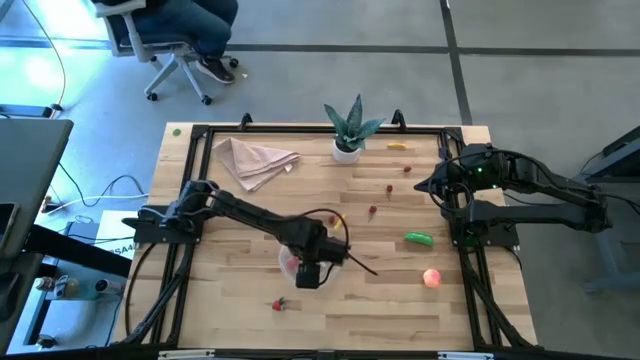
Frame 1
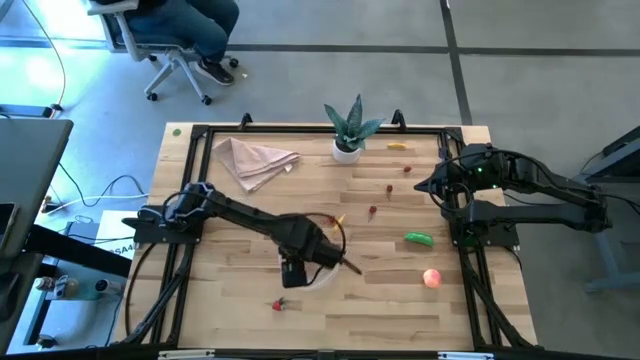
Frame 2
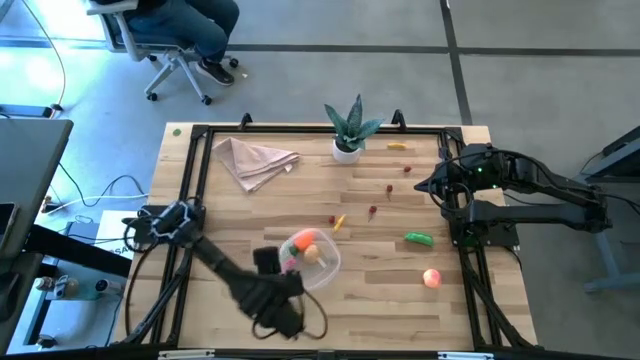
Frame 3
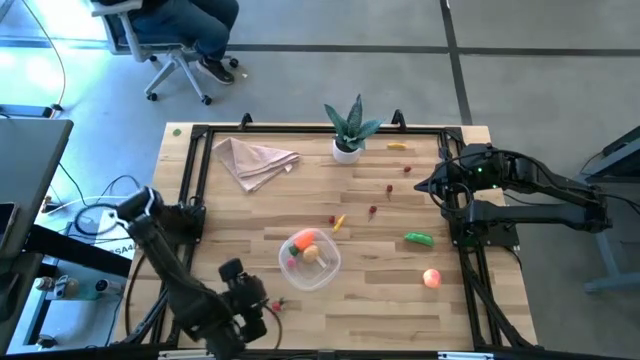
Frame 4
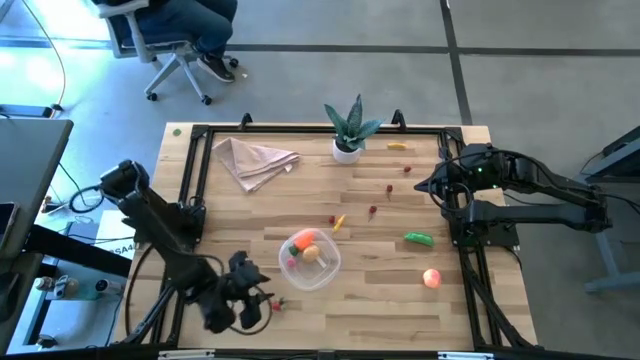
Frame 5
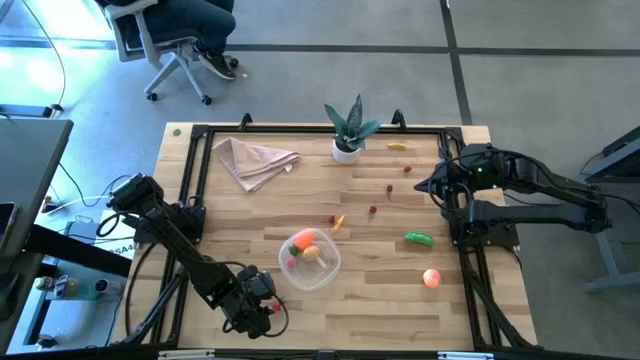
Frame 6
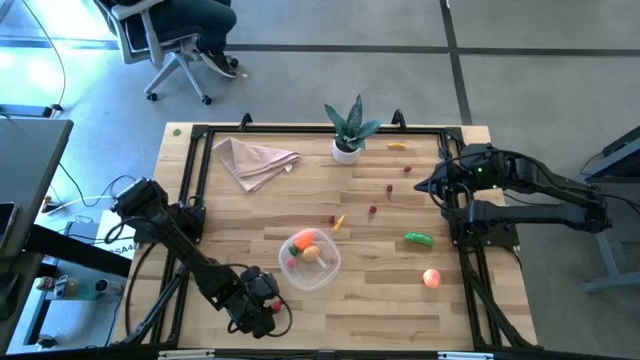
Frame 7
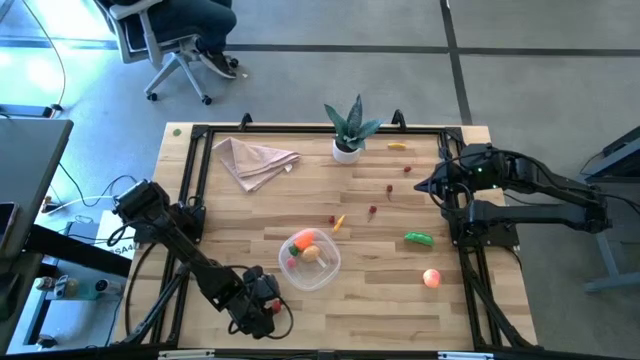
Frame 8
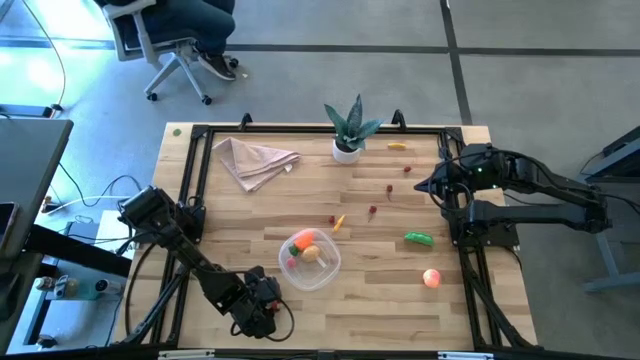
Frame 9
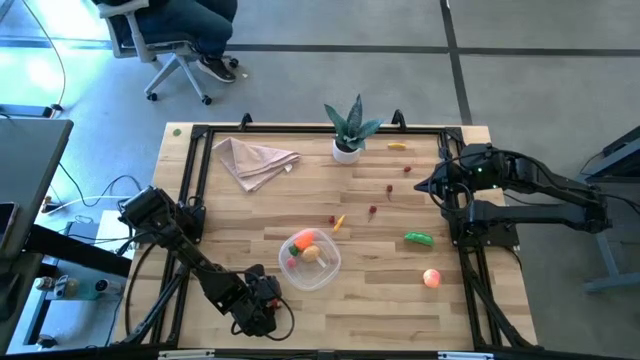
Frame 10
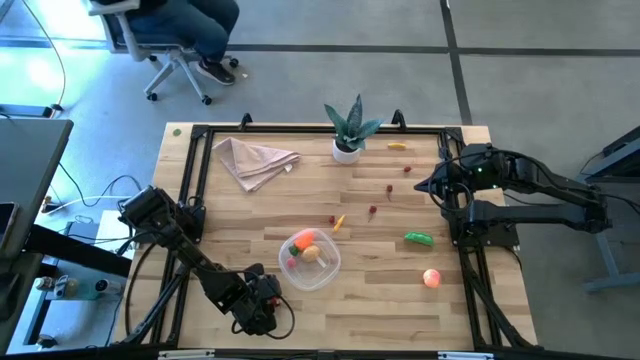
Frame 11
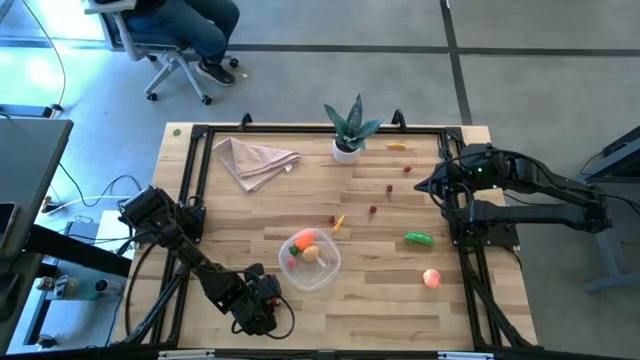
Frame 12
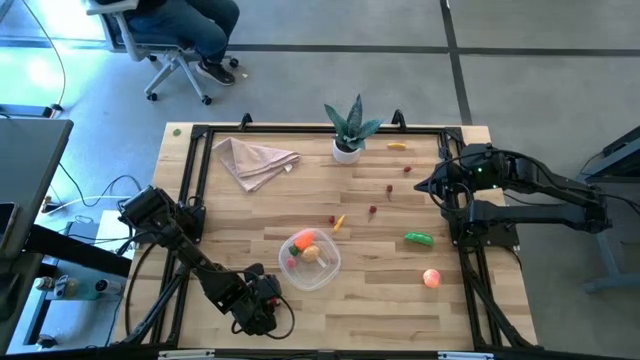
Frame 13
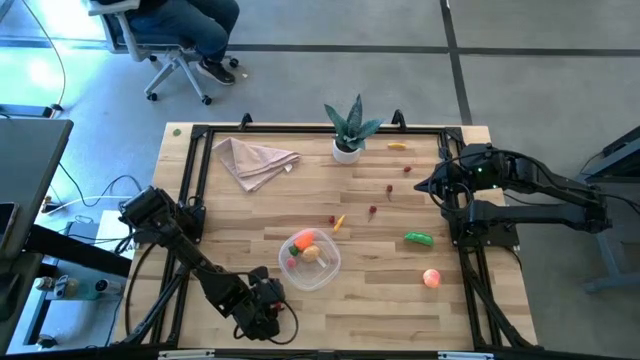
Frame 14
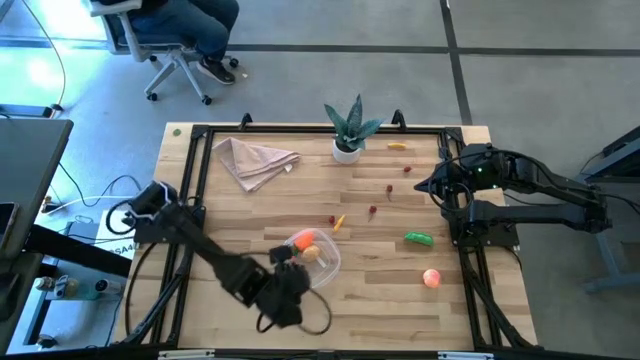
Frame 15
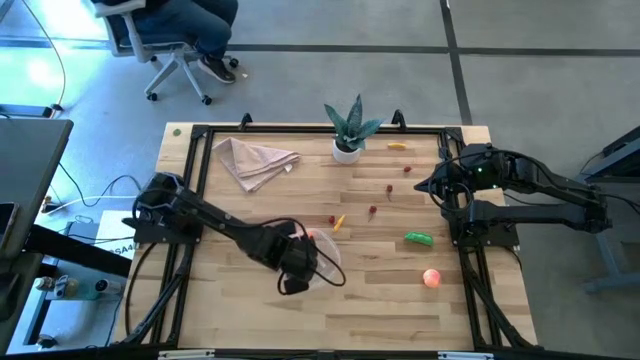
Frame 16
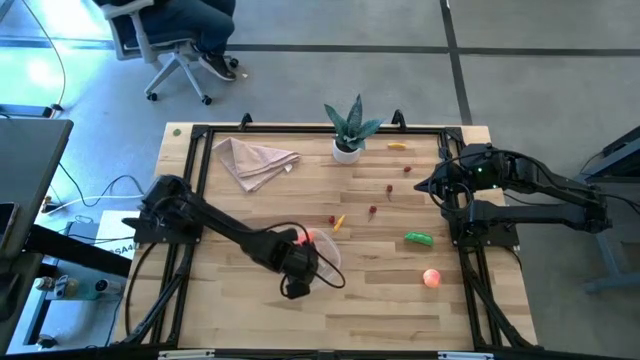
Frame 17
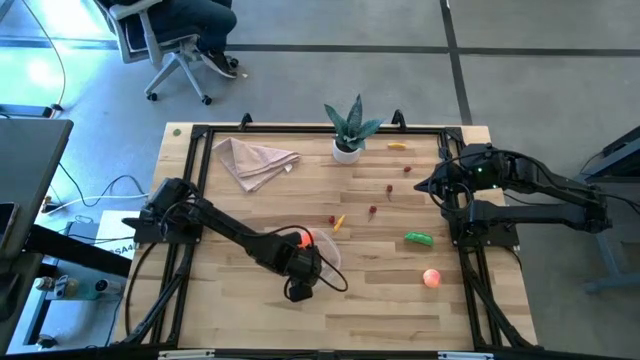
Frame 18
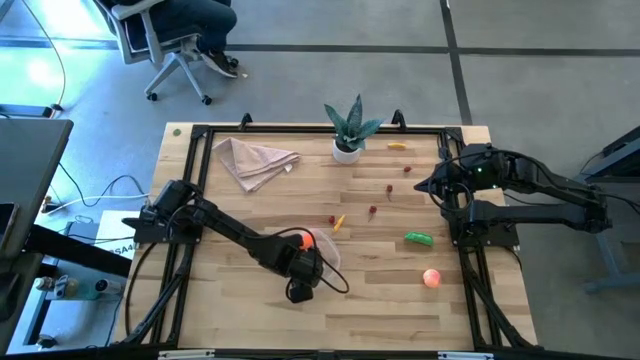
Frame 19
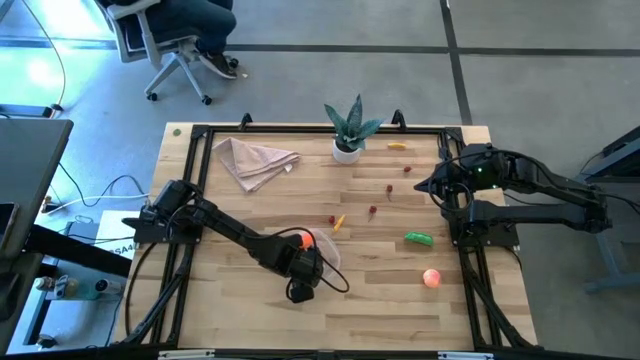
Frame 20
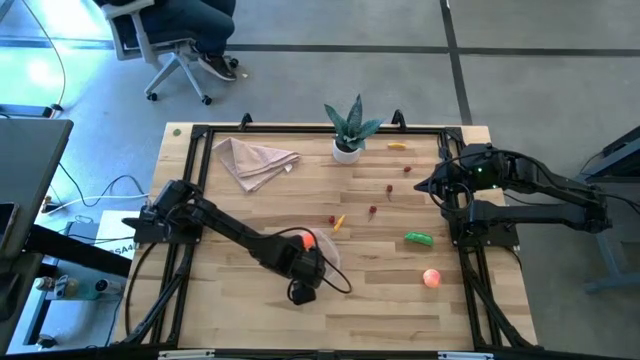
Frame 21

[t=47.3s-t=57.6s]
Task: Pick and placing Produce into tupperware
Put the strawberry into the transparent container

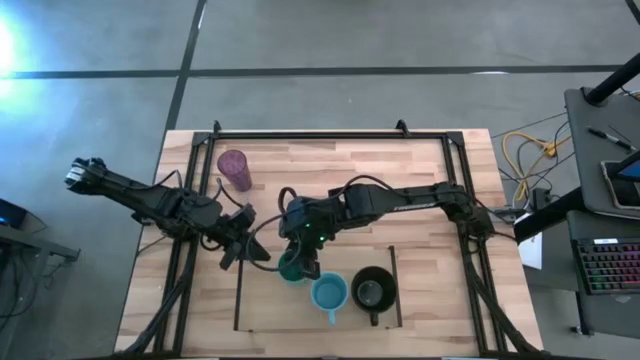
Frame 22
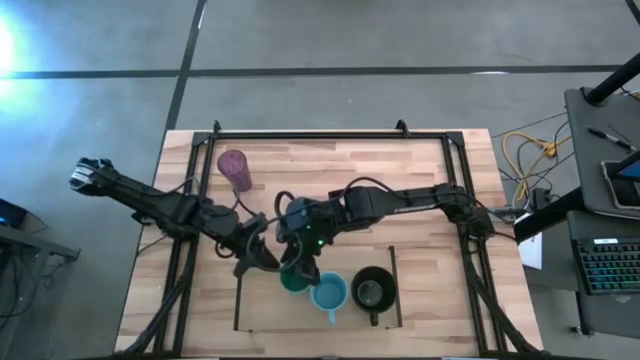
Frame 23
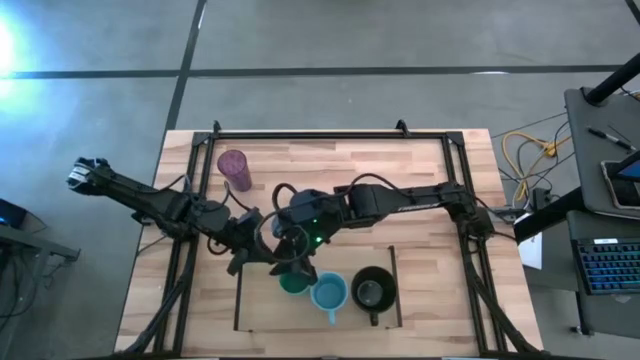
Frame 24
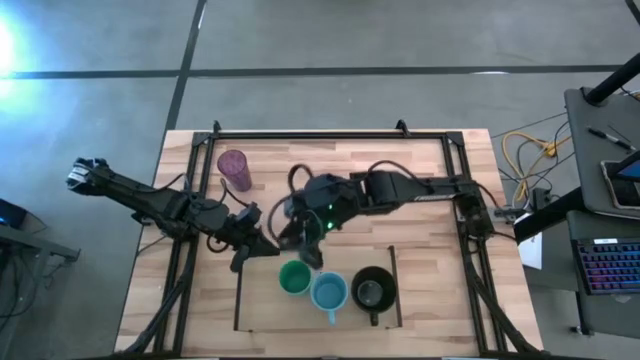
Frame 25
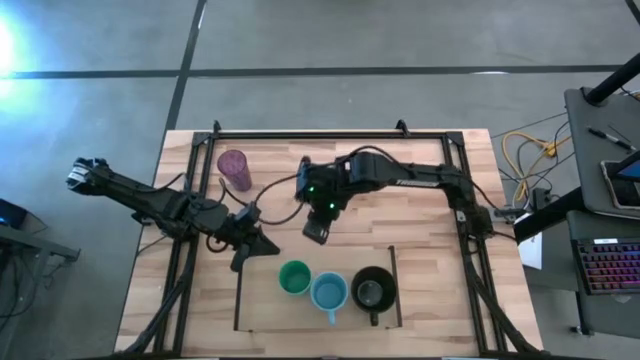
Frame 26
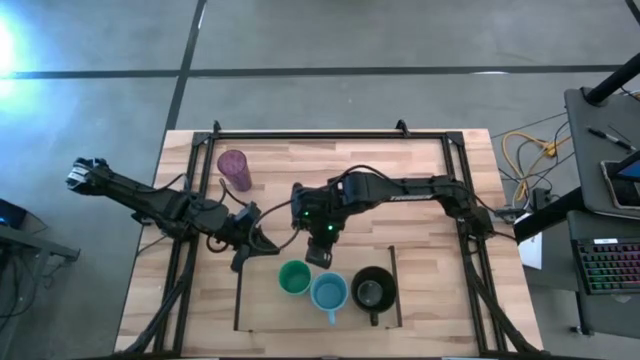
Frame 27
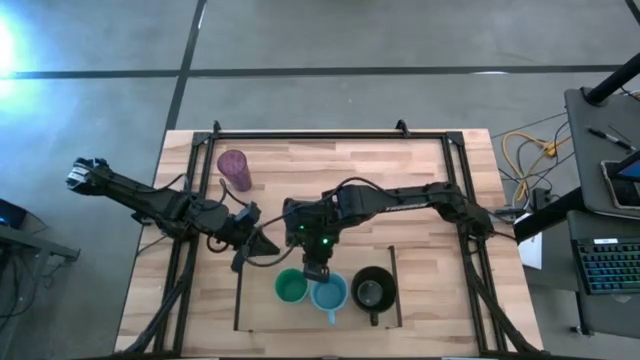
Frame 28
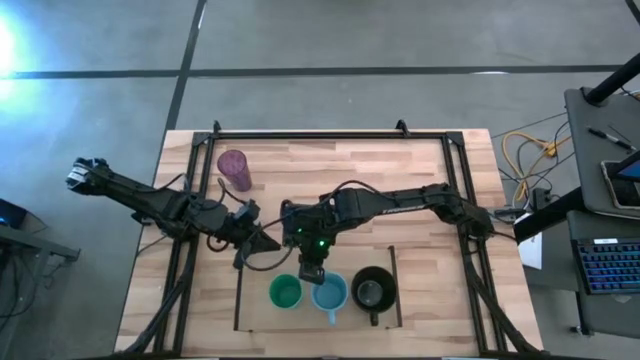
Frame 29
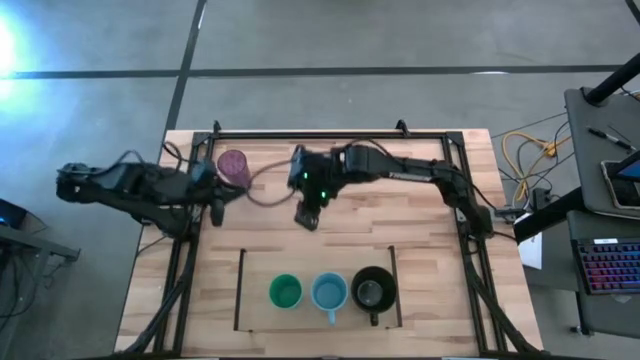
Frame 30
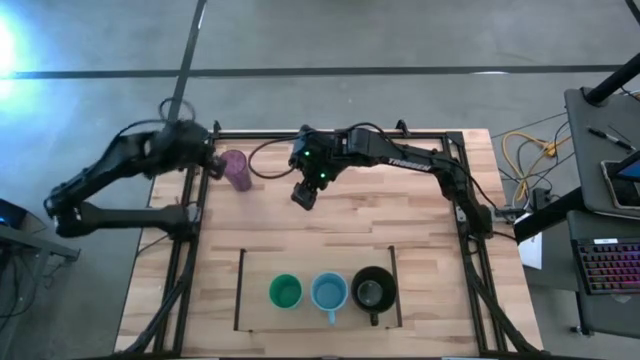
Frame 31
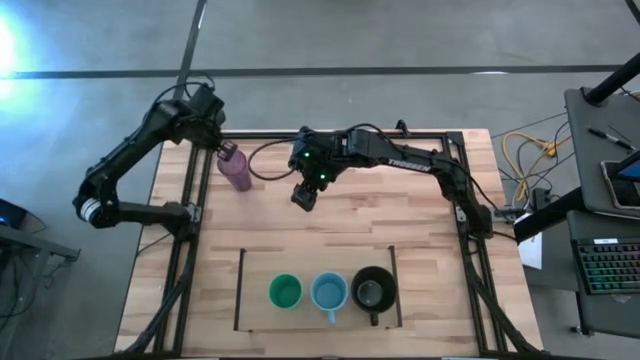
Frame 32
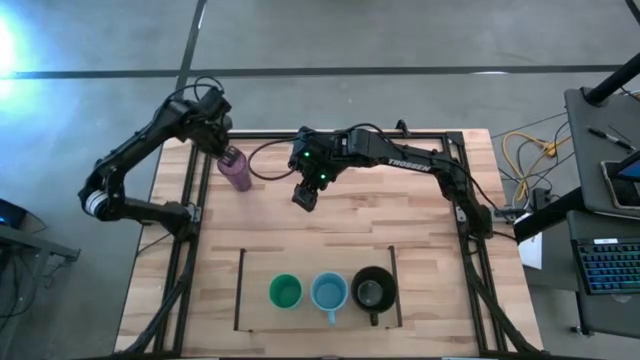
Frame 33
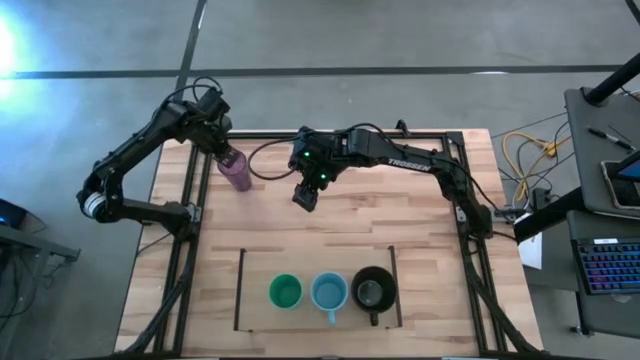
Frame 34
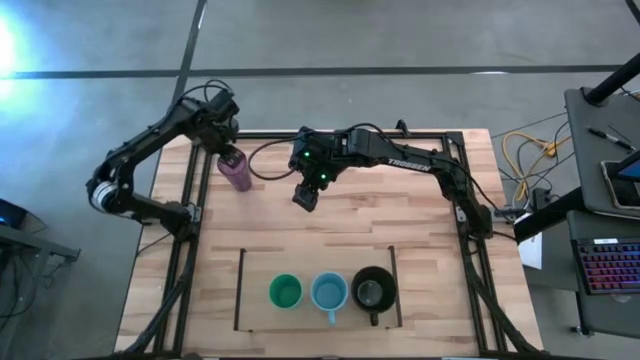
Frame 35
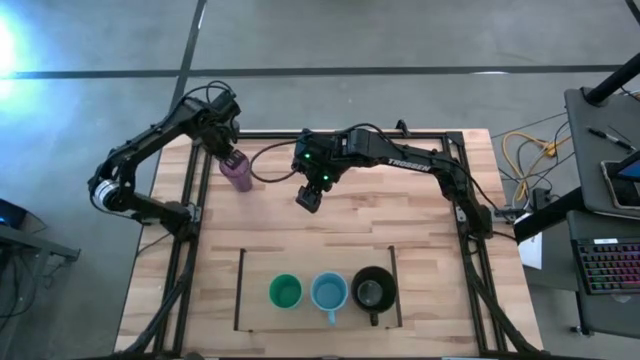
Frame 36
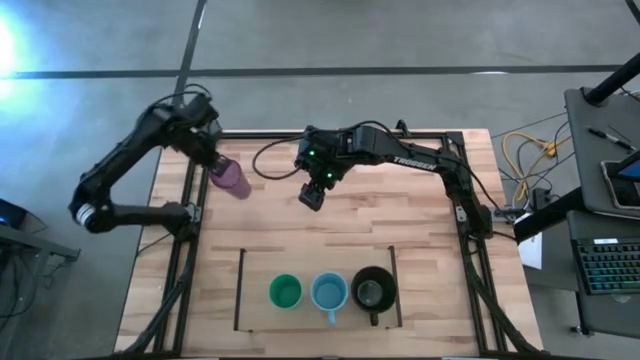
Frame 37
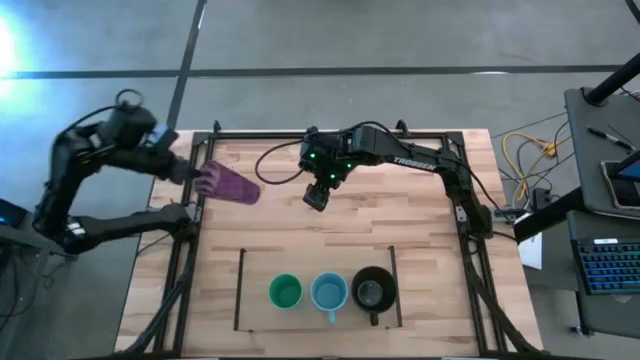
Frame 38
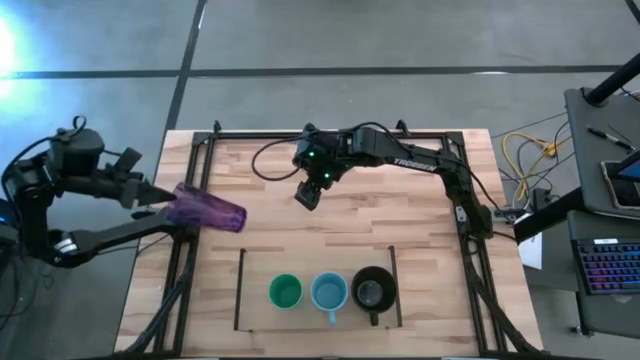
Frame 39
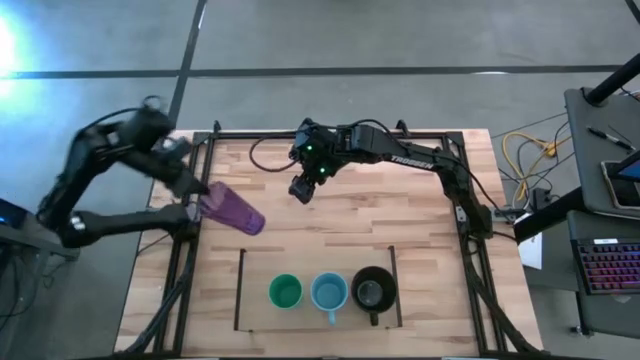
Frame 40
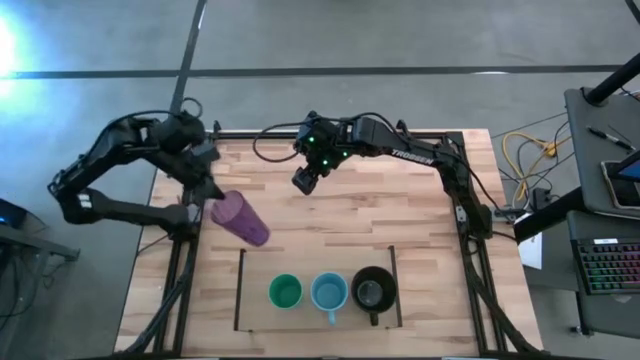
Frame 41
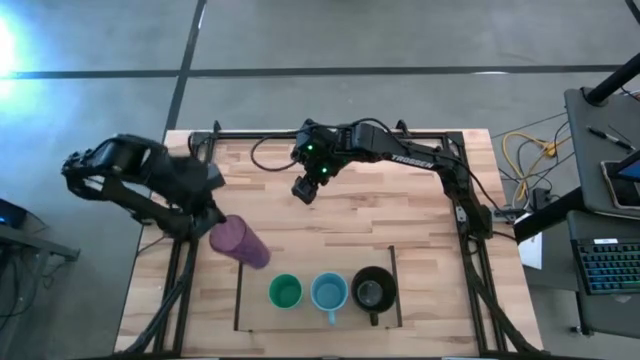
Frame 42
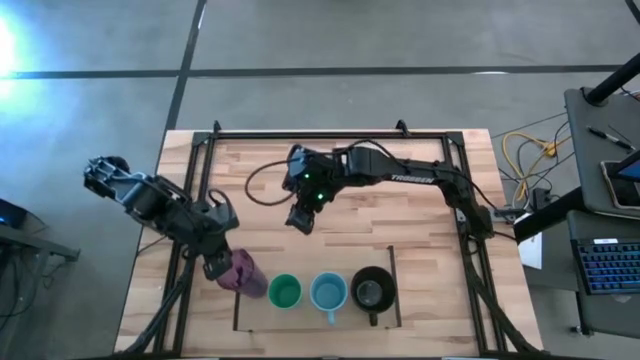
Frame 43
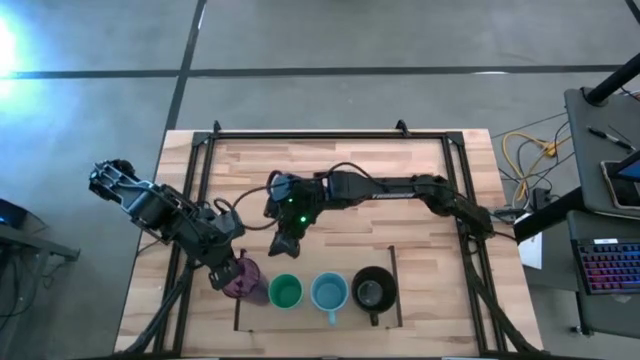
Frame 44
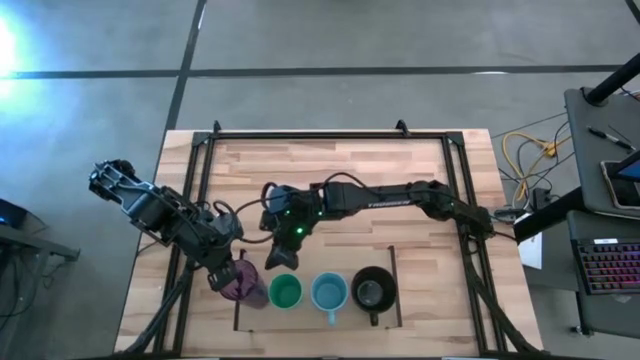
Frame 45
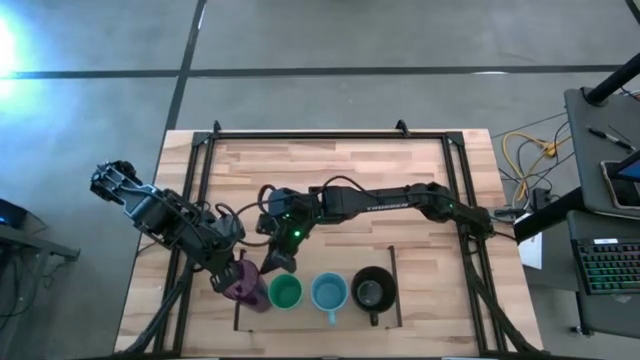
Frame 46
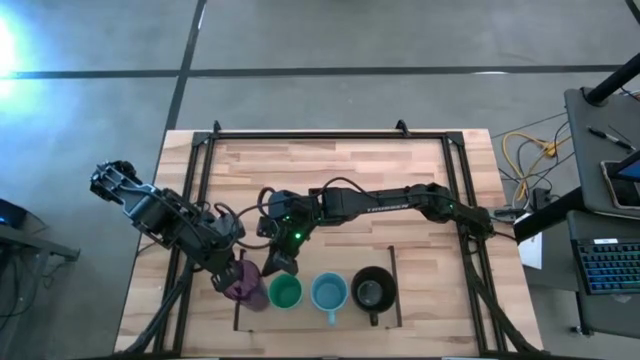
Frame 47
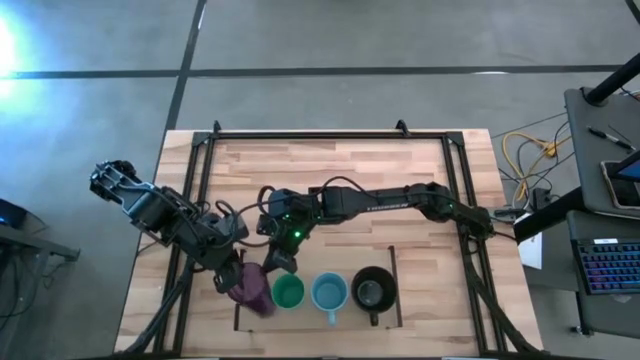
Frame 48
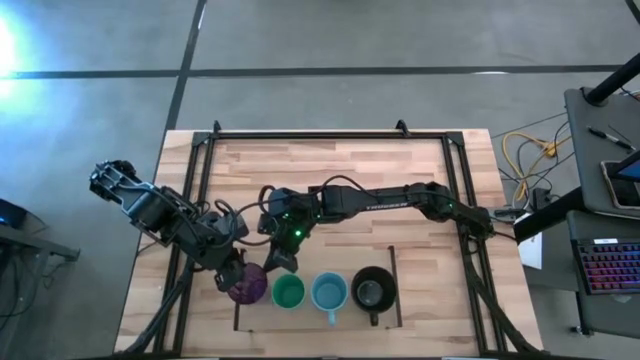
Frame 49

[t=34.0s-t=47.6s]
Task: Stack small to large cups/mugs on shelf
Put the purple glass on the shelf
